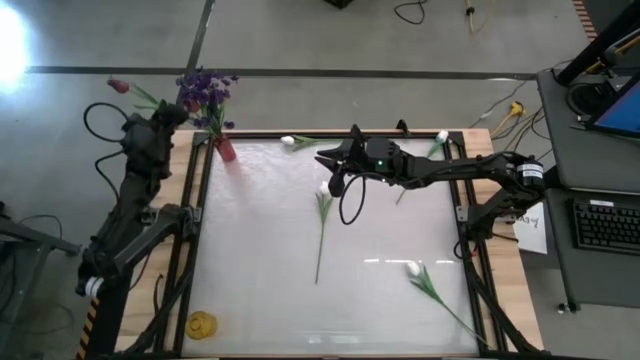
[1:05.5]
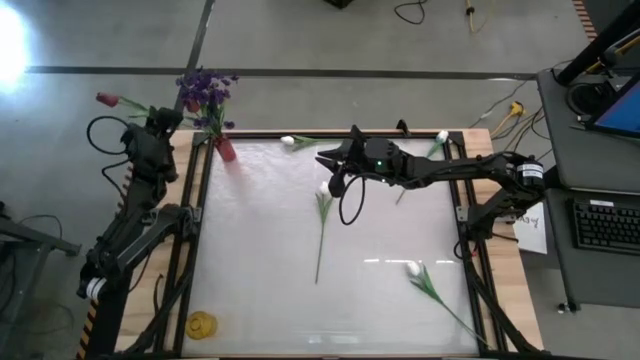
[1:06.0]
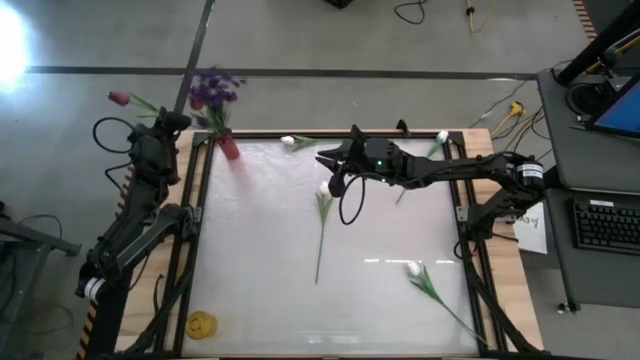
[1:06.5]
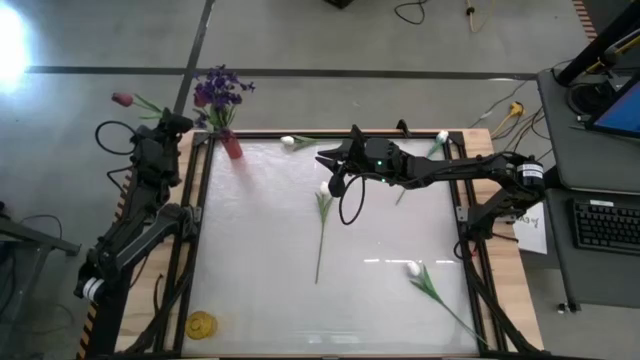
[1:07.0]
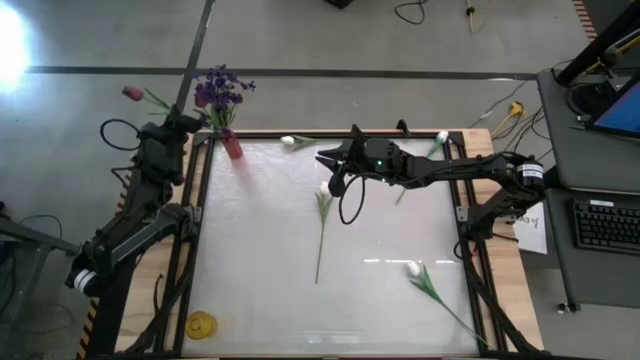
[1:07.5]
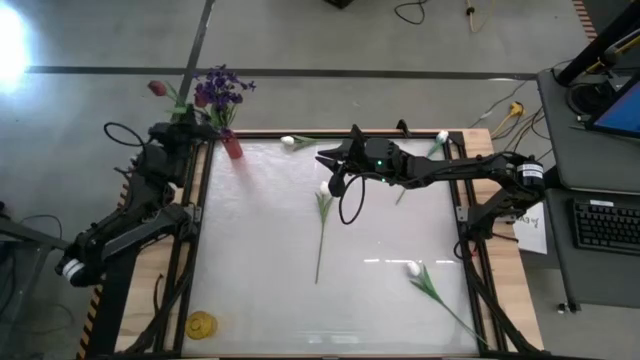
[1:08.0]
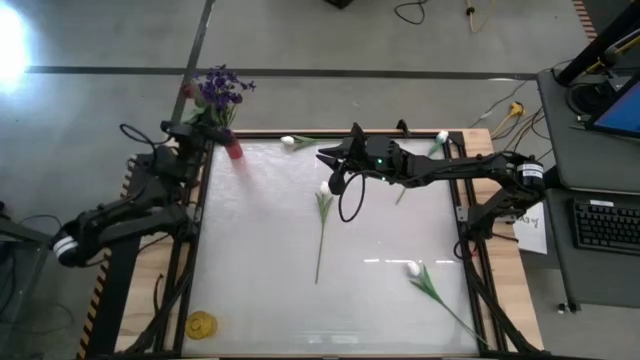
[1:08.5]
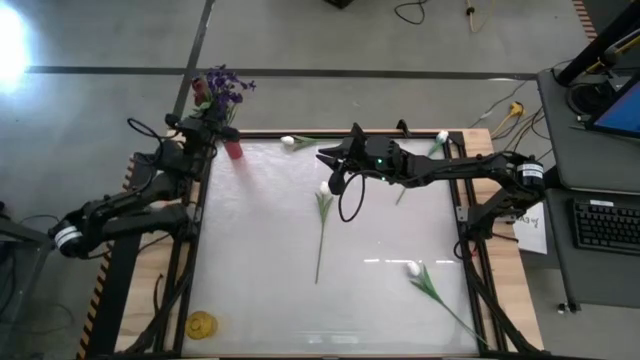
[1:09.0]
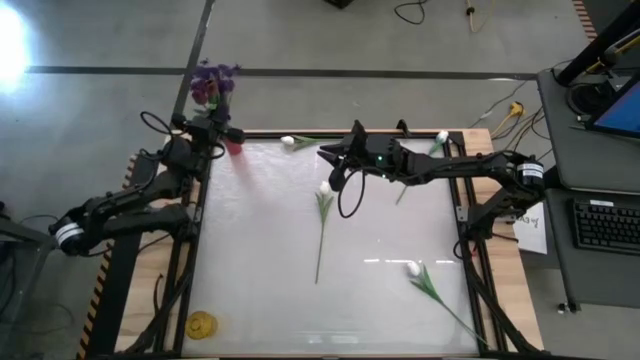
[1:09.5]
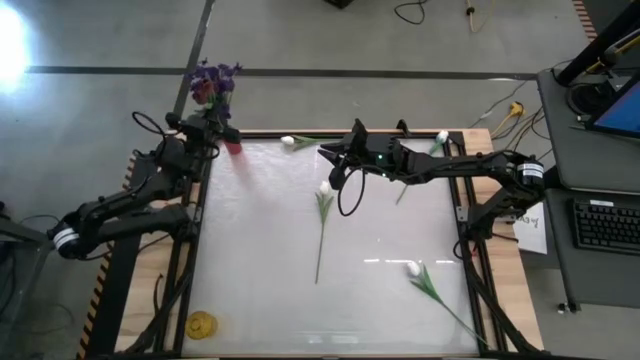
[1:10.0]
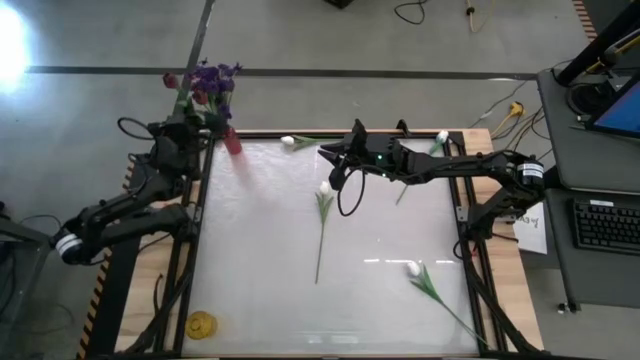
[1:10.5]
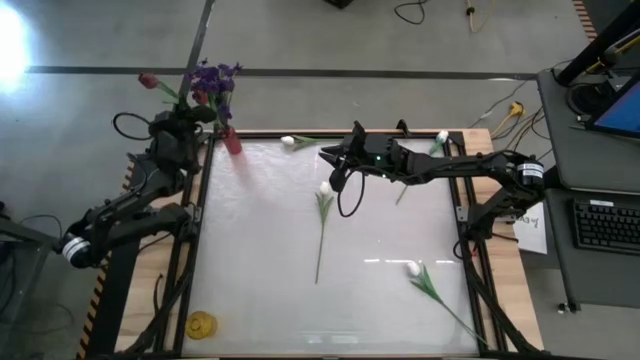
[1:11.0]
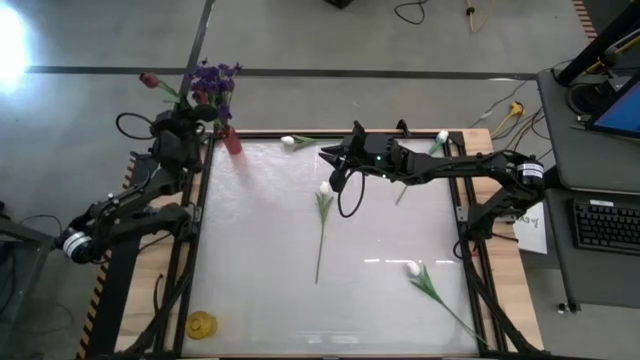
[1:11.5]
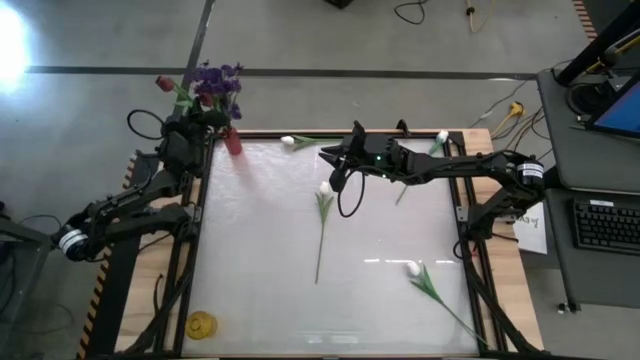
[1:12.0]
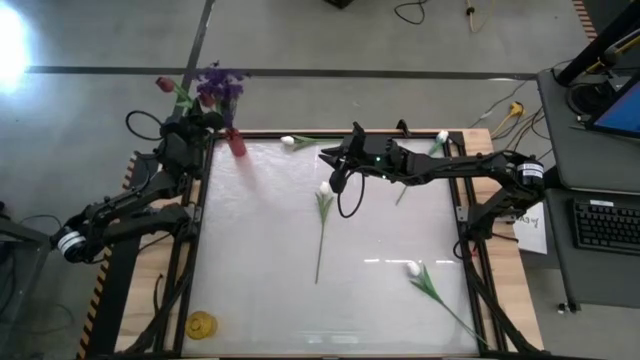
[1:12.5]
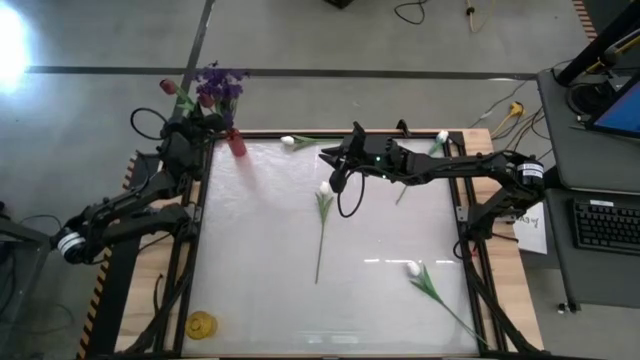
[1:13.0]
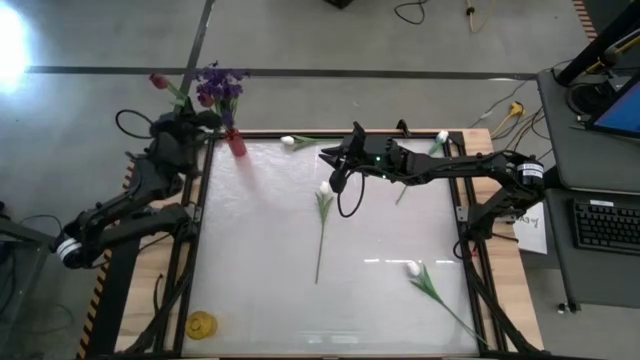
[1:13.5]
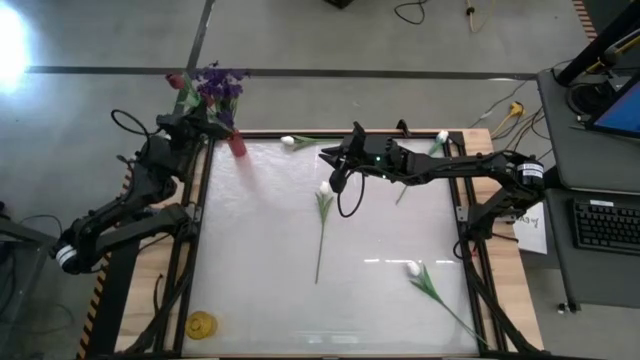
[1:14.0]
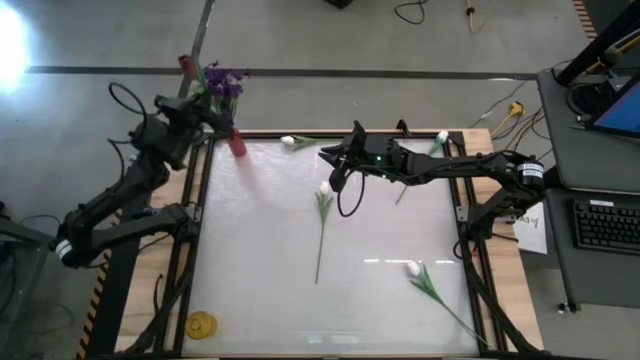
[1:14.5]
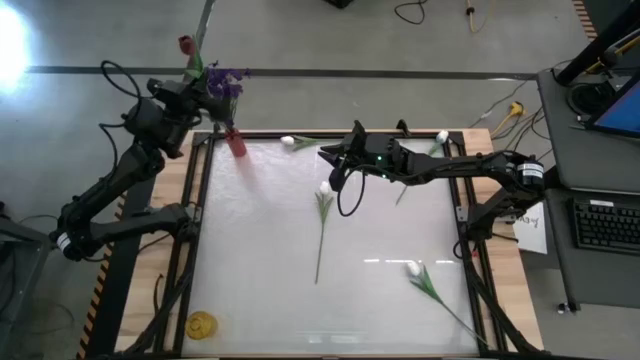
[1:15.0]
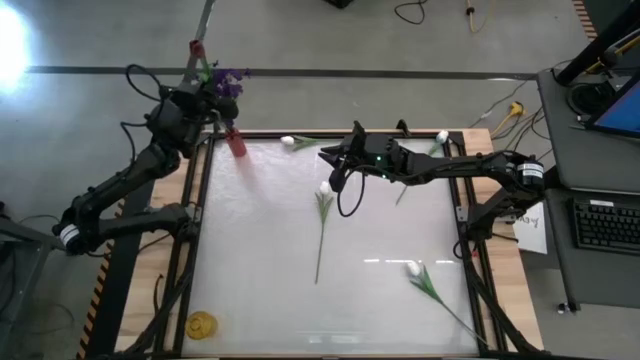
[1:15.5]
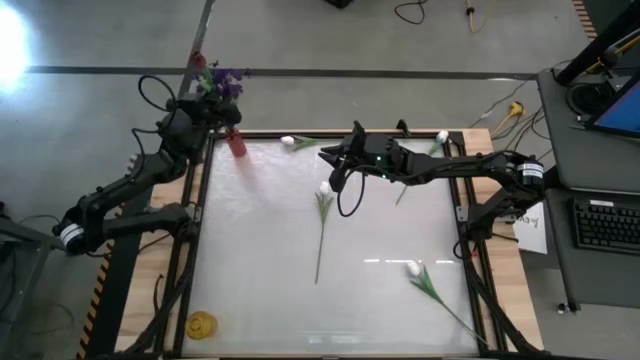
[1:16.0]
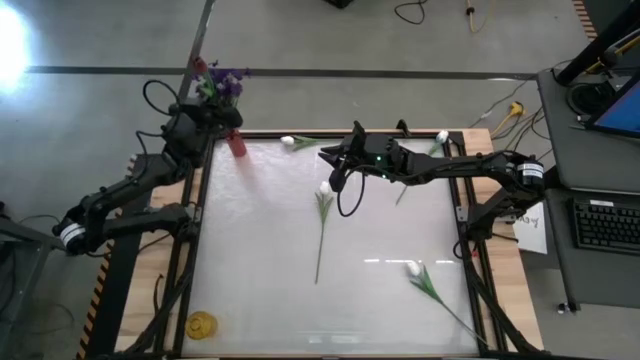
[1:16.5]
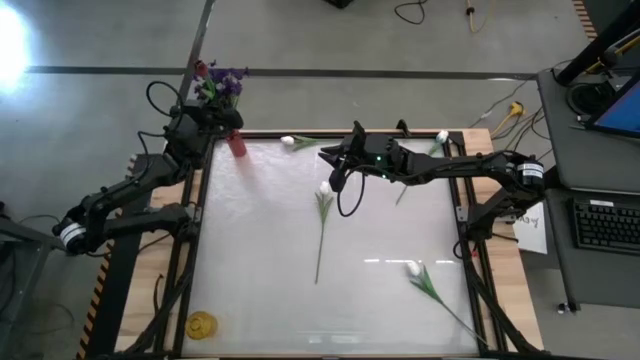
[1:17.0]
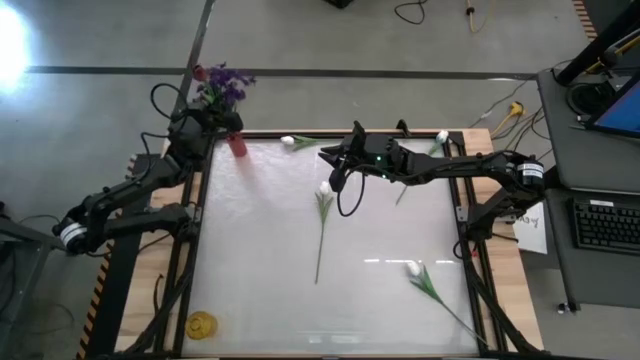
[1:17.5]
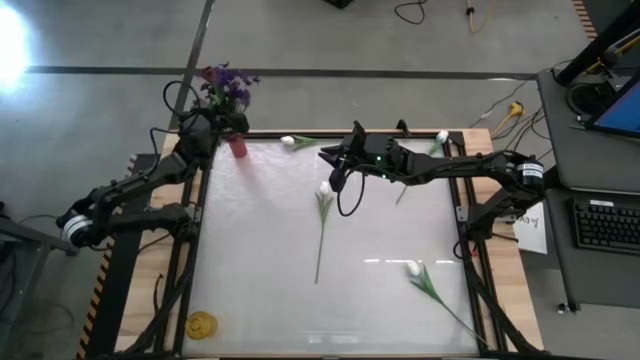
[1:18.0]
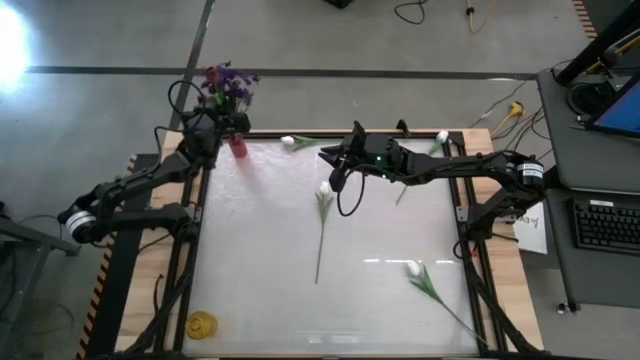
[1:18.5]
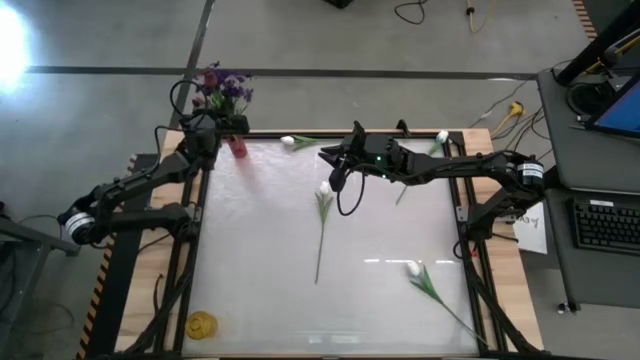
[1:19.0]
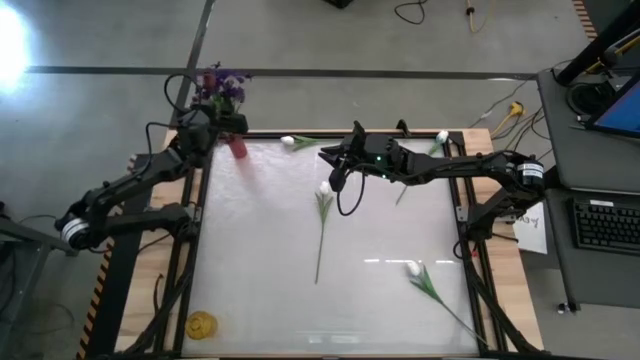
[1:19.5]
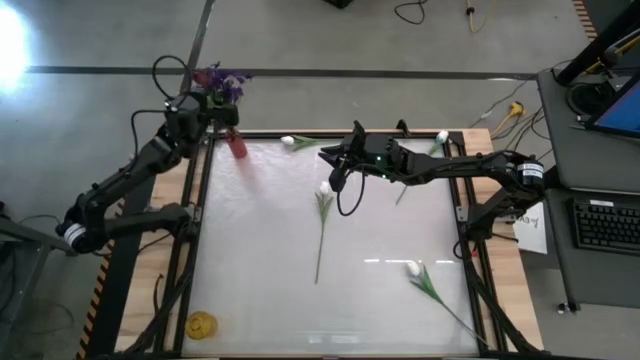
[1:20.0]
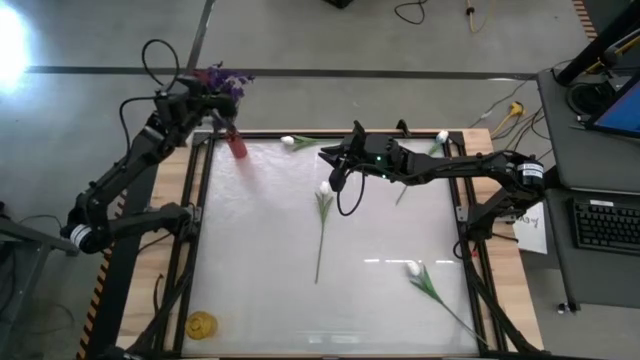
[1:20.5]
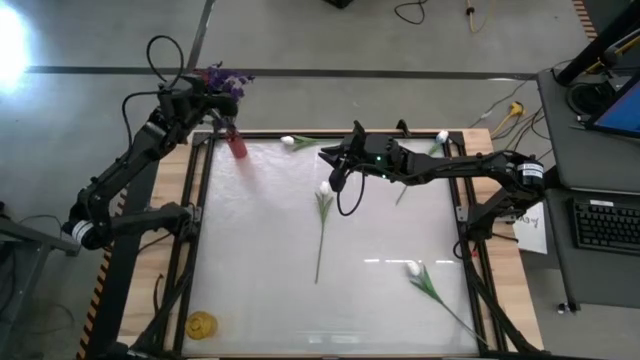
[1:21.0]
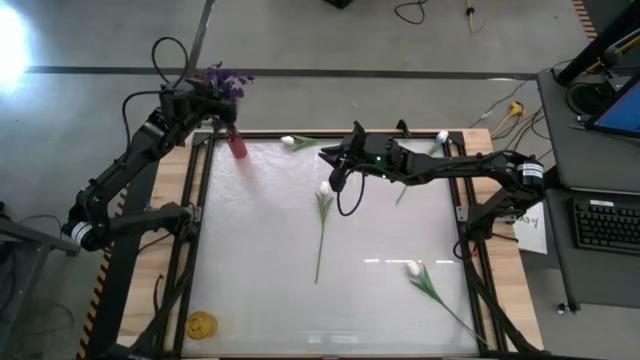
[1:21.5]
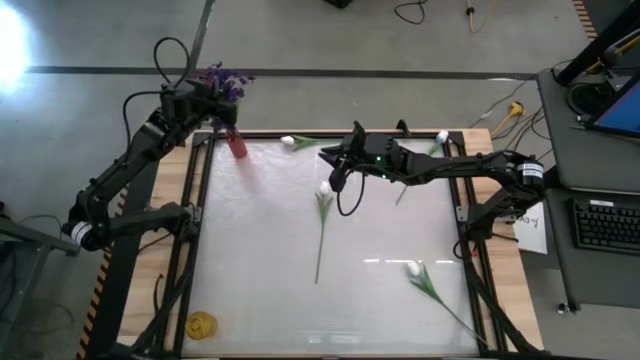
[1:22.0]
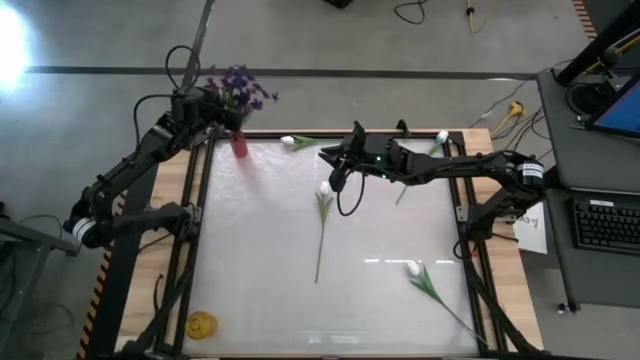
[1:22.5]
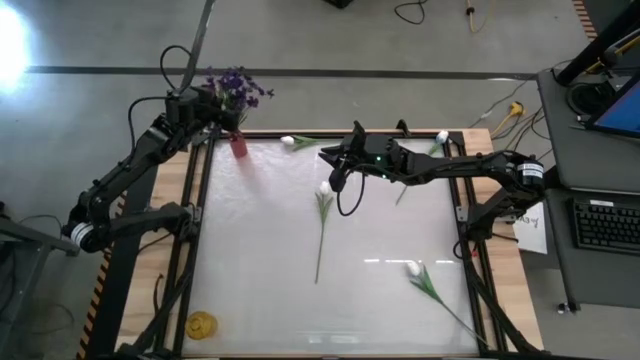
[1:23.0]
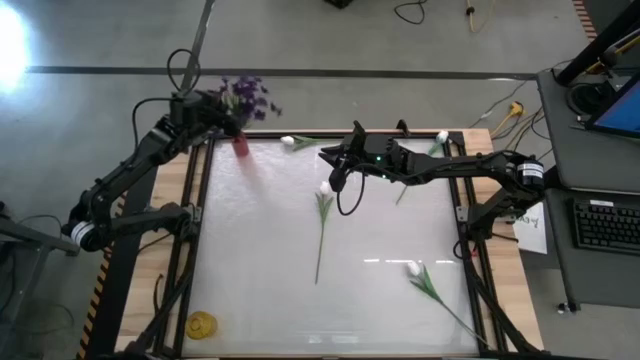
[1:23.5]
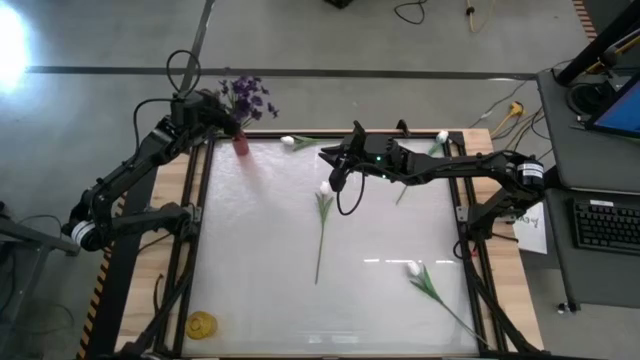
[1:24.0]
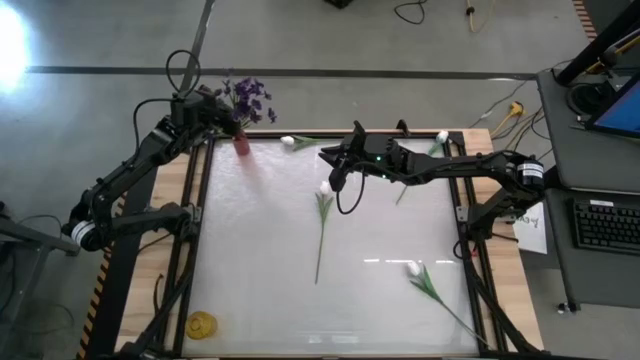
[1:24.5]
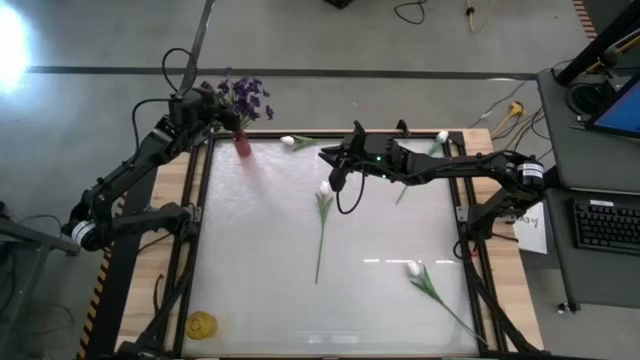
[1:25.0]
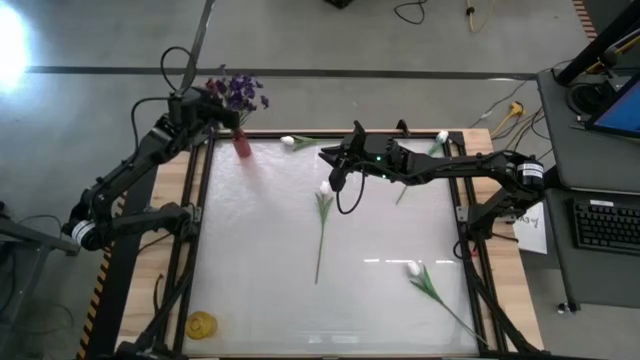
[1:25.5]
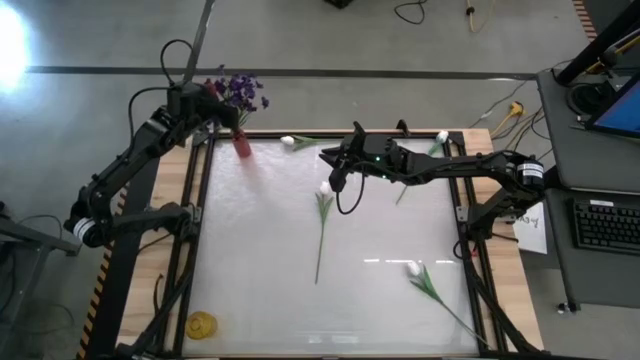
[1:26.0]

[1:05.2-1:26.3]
Task: Sort flowers into vase by color
Put the red flower into the red vase
